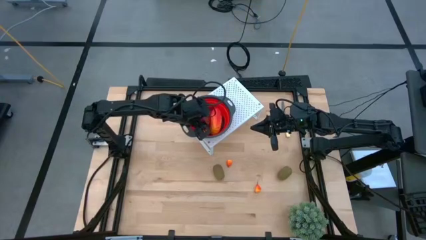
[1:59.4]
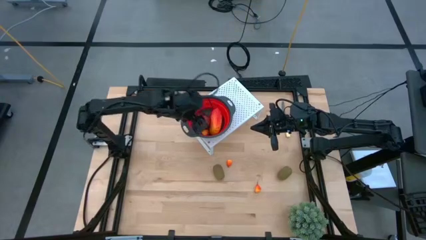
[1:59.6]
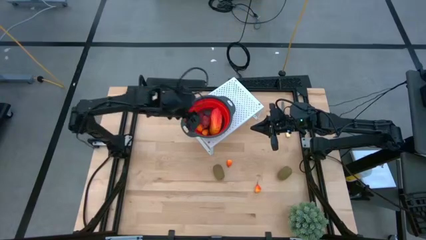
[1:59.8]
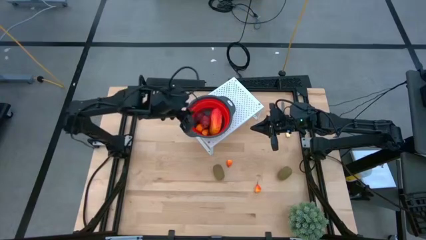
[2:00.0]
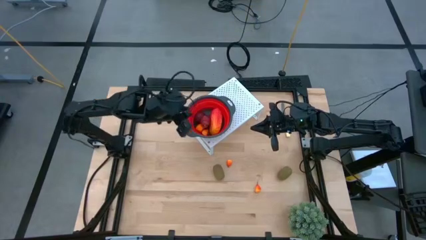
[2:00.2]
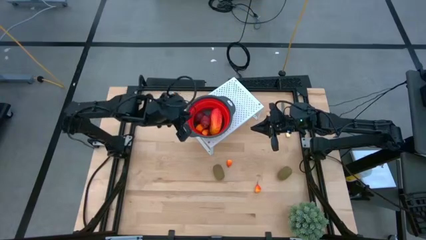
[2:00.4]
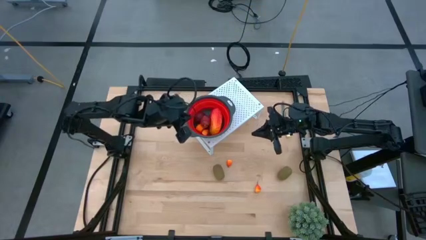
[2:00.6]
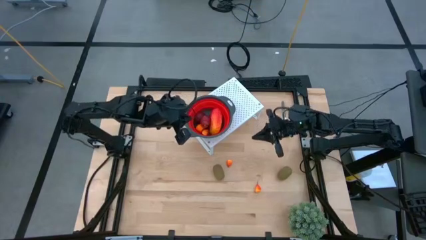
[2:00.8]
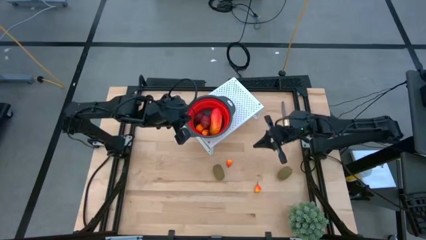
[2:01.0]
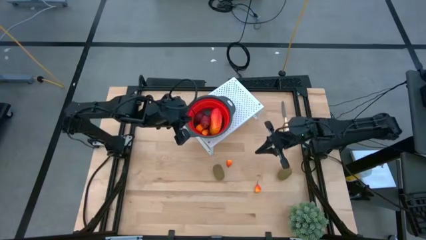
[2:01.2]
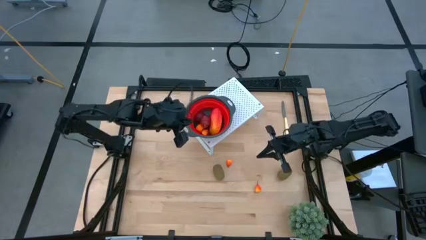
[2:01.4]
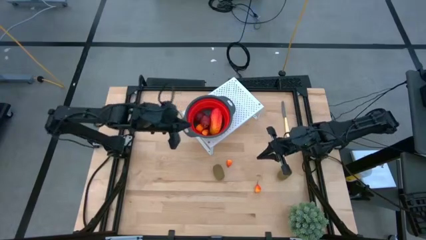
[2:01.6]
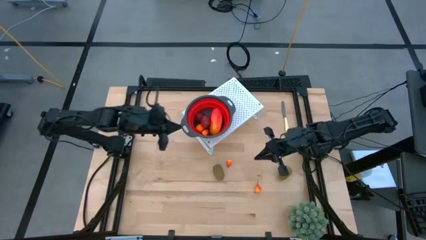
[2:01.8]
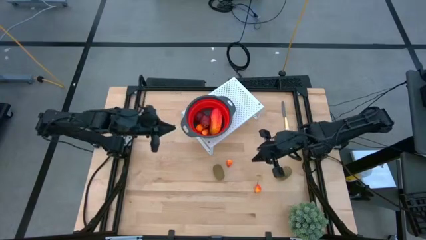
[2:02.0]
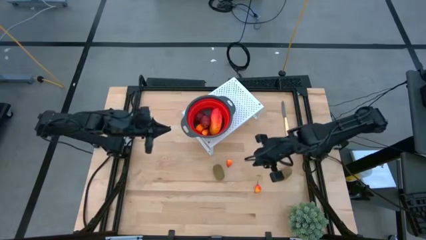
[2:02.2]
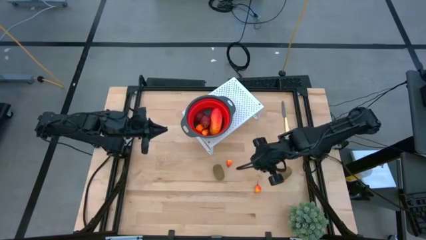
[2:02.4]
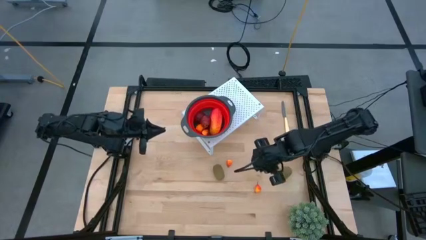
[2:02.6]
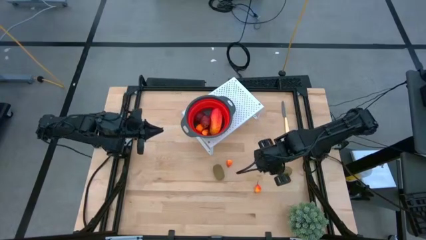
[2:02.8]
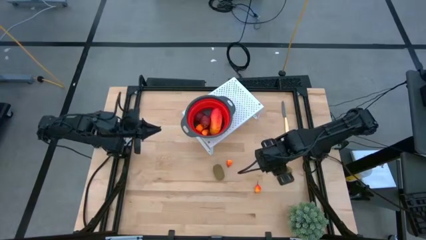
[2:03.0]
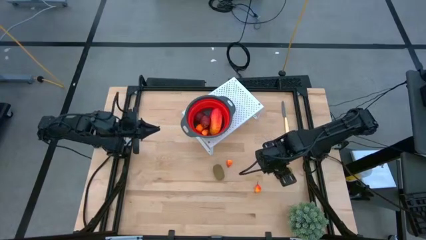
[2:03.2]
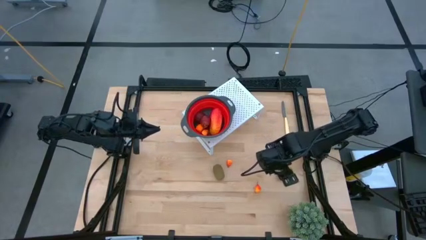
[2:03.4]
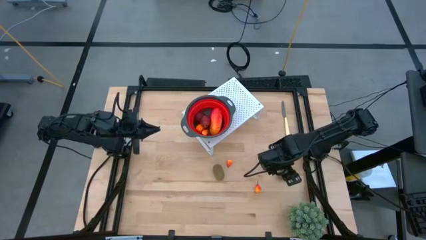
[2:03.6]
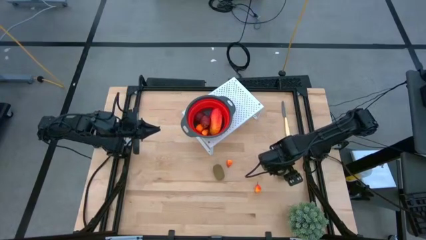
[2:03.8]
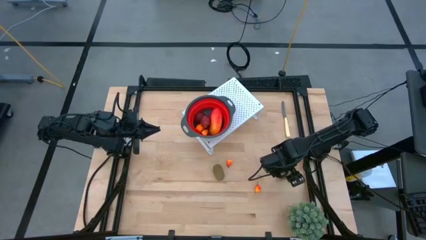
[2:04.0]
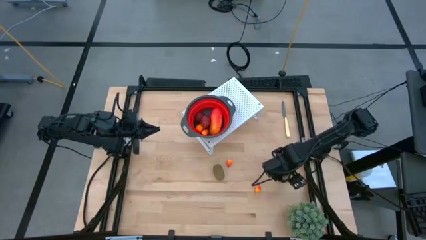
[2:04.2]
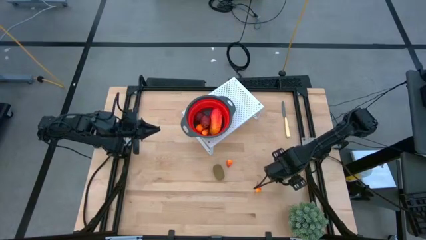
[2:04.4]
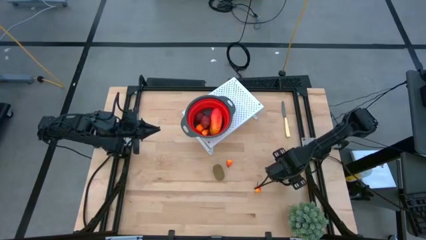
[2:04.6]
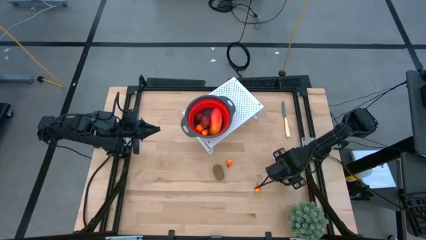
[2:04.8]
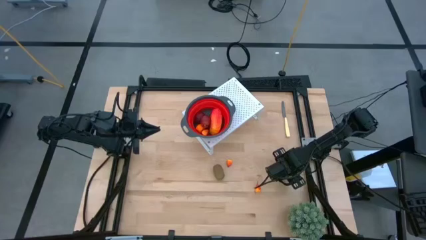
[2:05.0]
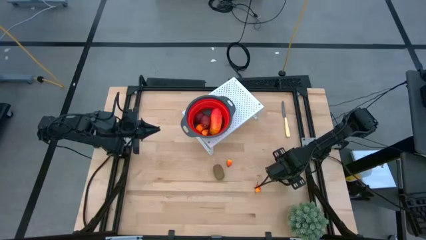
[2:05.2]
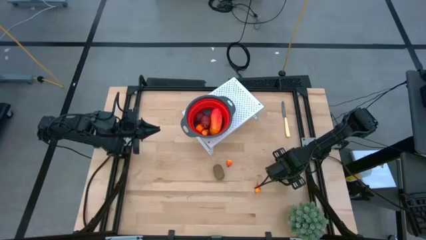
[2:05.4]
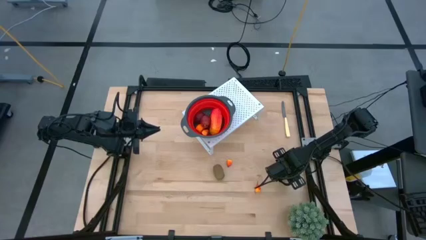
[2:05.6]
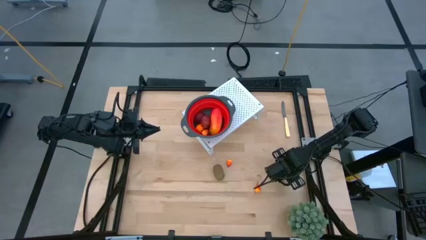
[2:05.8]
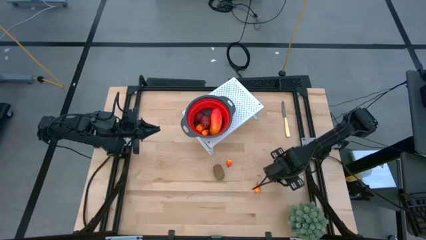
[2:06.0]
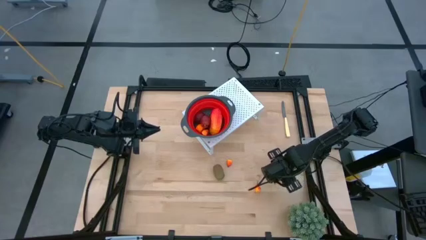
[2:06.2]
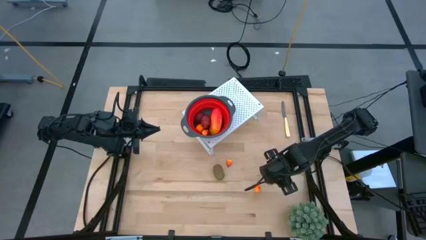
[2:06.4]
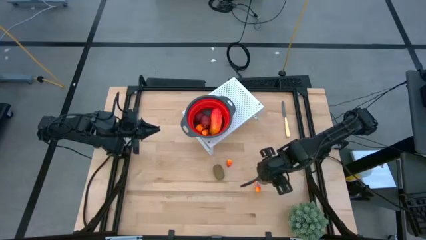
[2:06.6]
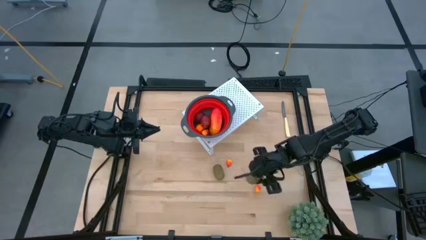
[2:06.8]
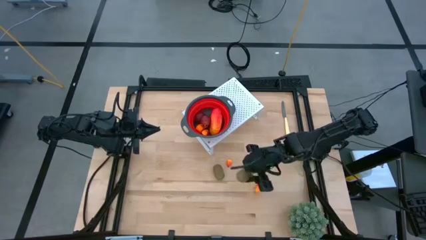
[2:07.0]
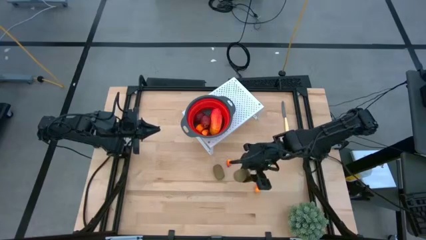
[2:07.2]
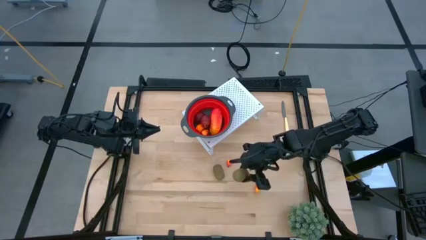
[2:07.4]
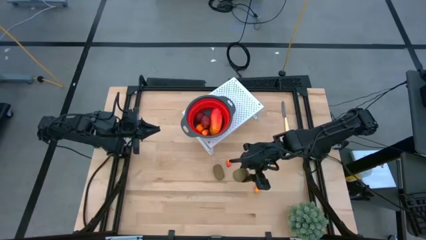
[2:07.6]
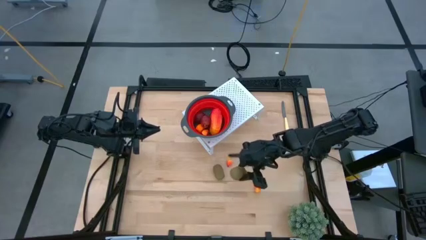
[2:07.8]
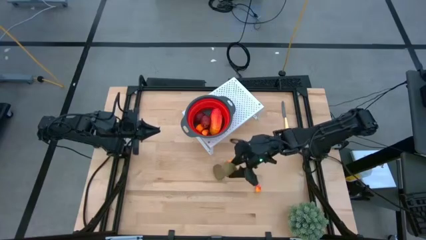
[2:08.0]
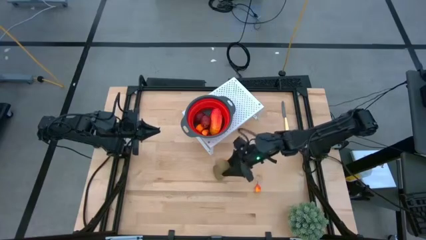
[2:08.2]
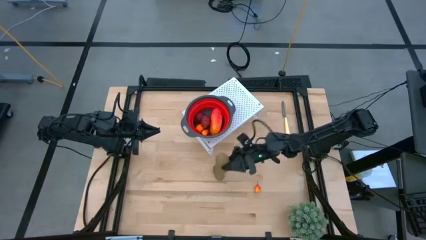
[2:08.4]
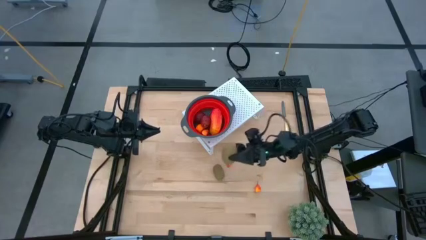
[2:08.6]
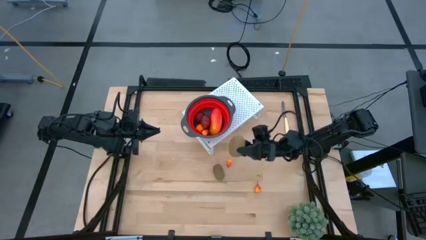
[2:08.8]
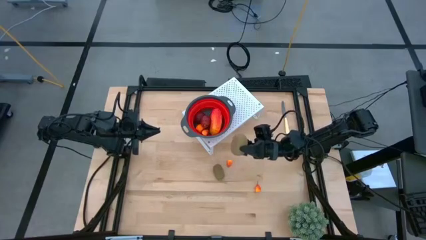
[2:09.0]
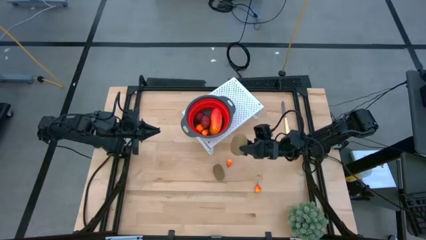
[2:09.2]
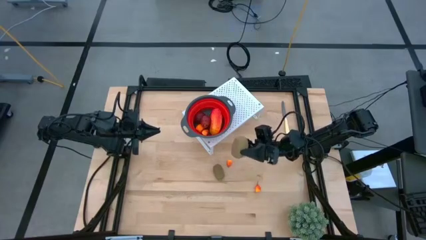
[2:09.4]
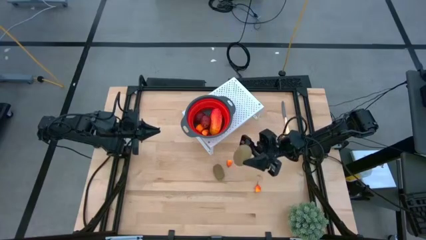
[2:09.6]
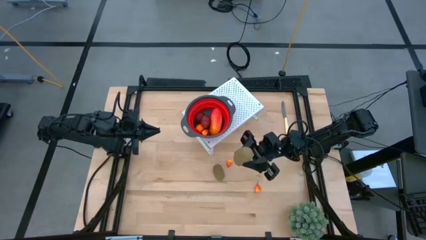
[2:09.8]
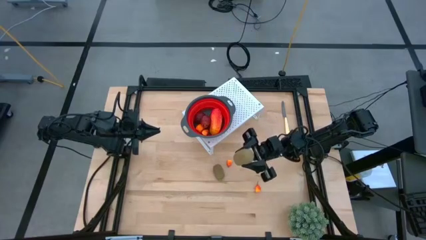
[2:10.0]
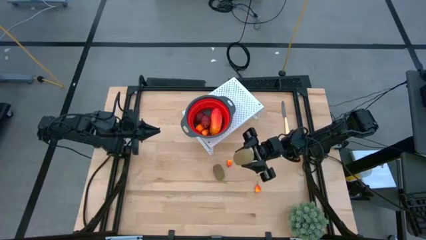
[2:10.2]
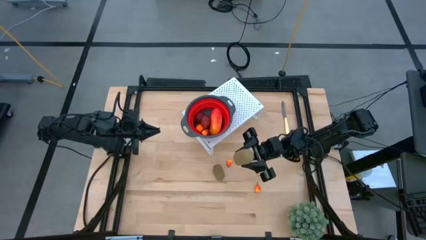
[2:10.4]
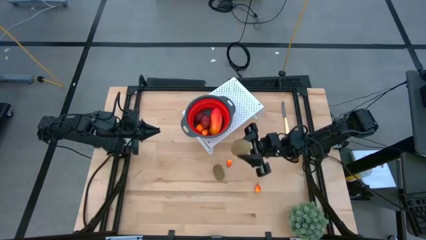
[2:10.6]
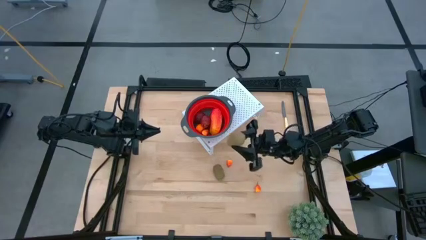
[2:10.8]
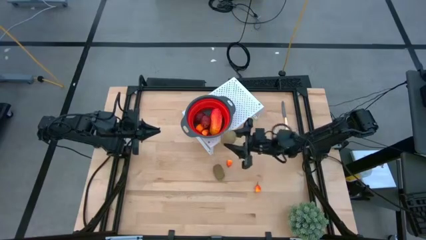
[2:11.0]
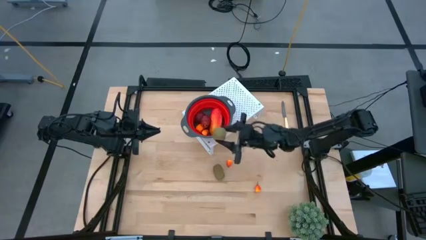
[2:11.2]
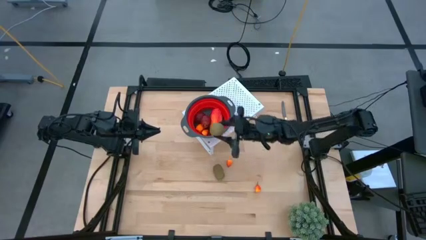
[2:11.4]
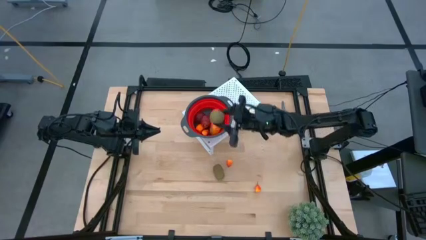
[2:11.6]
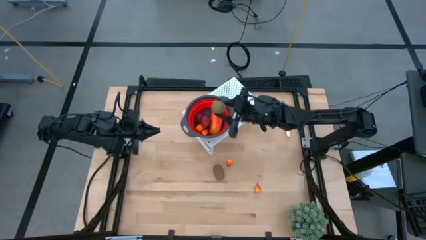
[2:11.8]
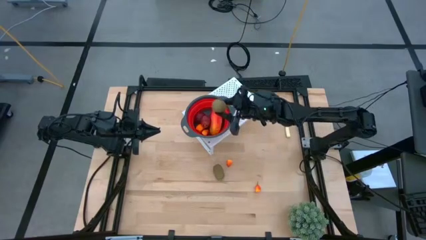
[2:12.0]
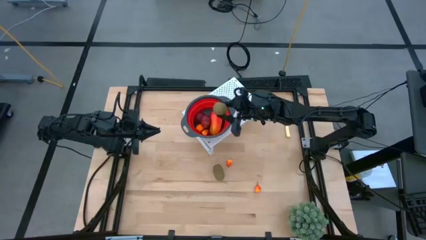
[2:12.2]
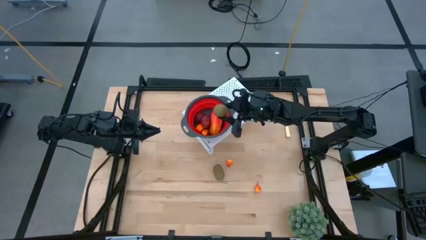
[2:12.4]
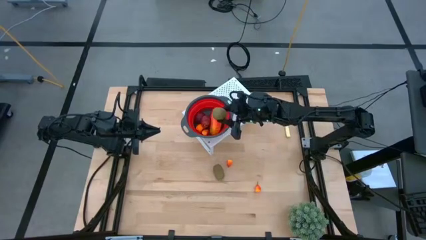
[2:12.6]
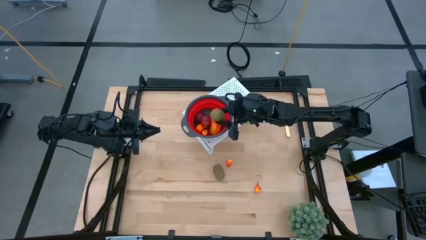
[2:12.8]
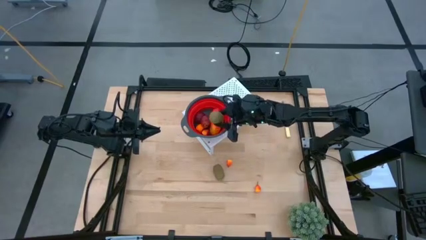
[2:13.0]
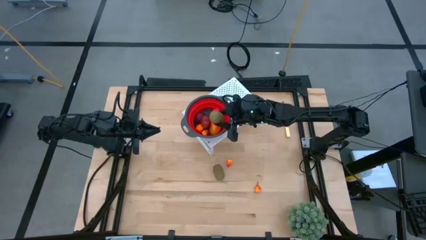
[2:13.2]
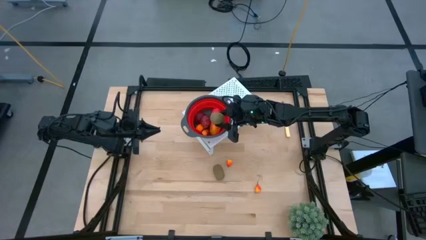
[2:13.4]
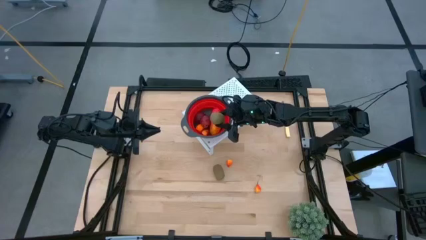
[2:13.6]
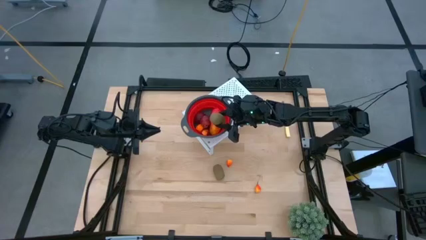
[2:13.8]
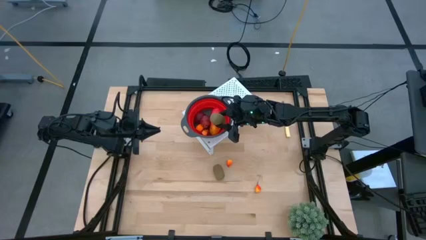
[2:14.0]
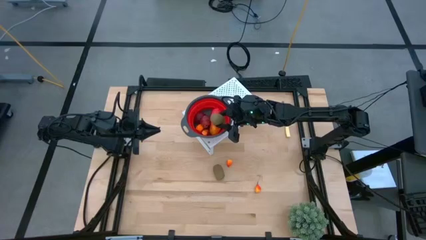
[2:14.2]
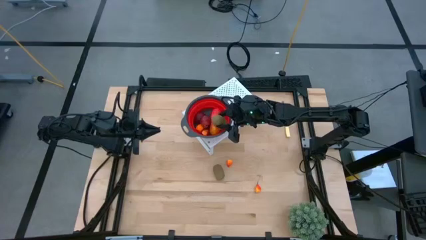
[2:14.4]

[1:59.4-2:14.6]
Task: Pick & Place Fruit
Put the kiwi into the red strainer bowl on the shelf
